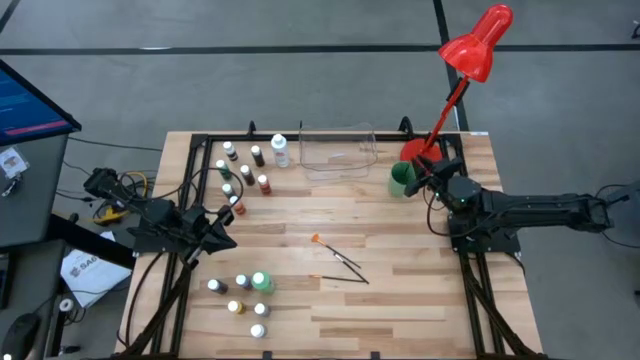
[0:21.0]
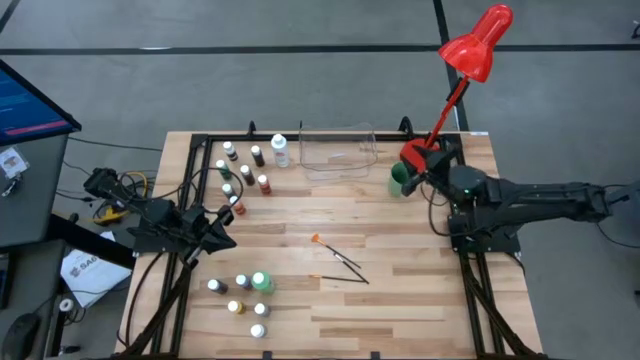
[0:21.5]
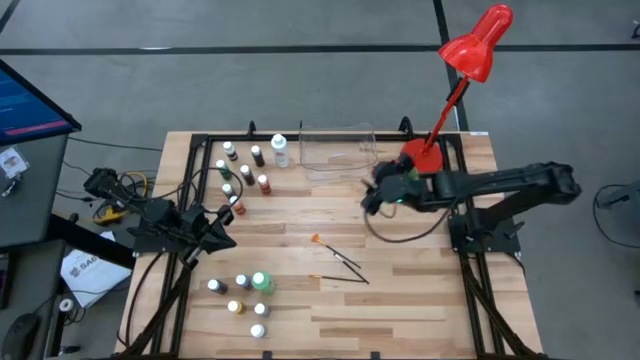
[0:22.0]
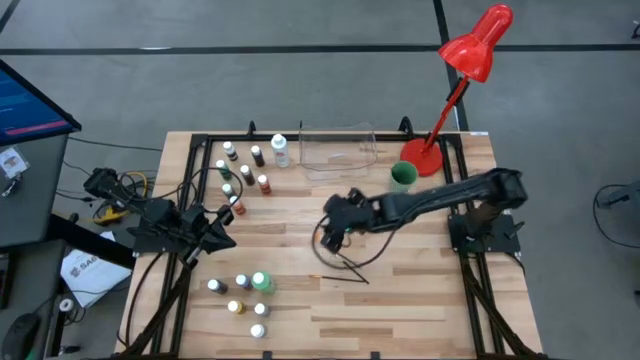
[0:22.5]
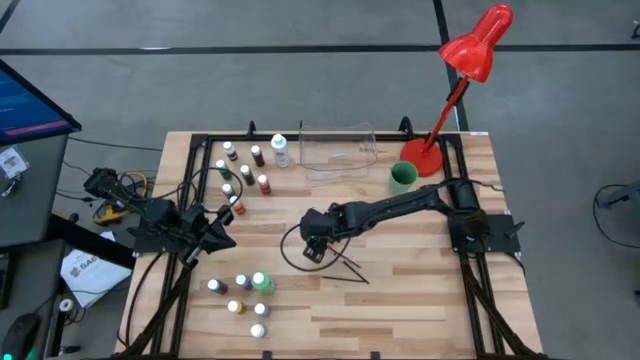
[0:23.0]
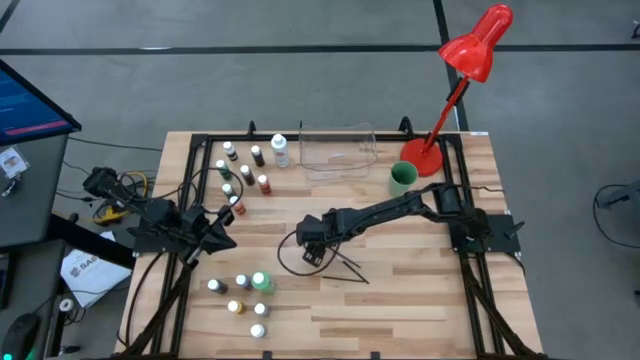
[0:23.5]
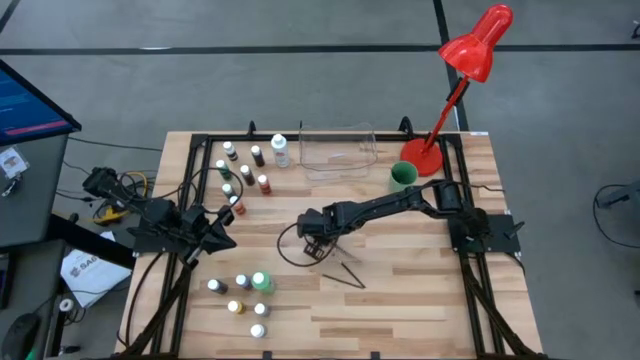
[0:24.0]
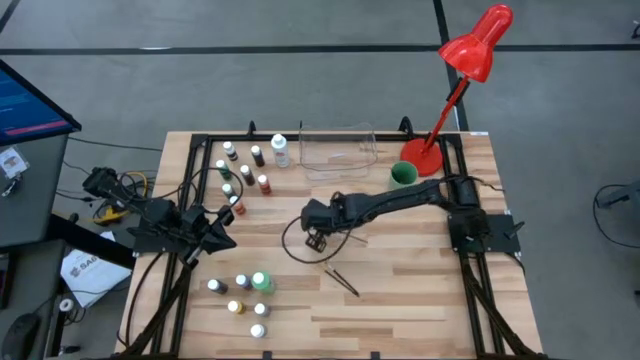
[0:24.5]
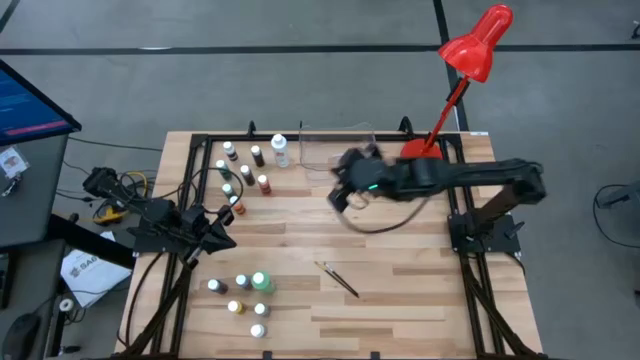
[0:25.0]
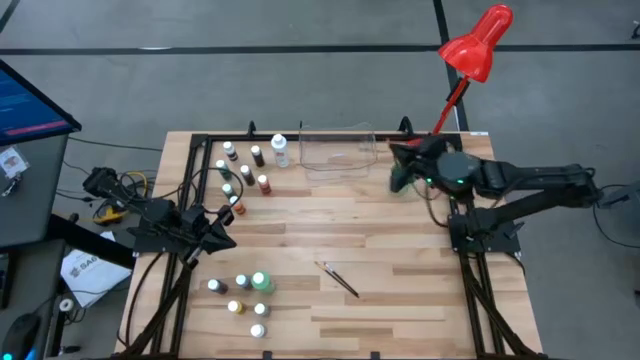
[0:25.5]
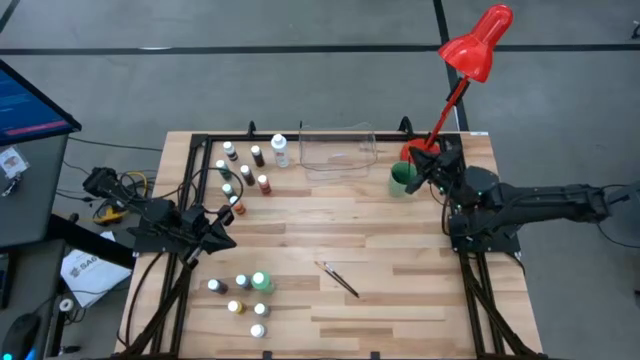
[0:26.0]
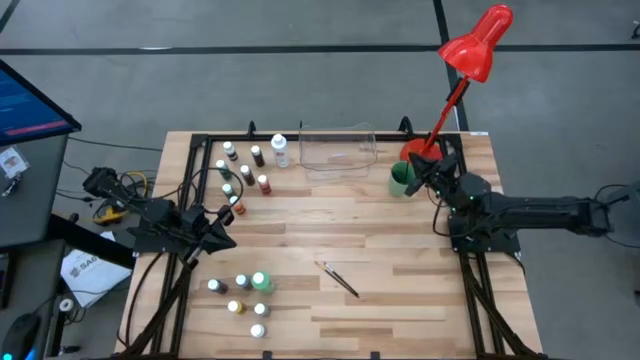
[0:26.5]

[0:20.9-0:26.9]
Task: Pick & Place Paint Supplies
Put the top gold paint brush into the green cup

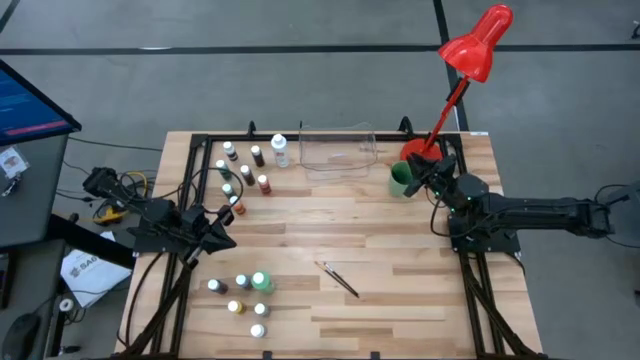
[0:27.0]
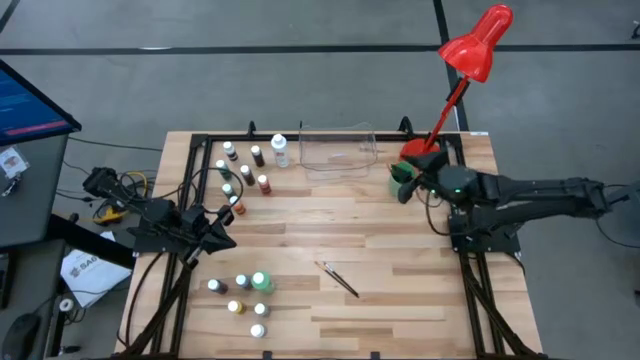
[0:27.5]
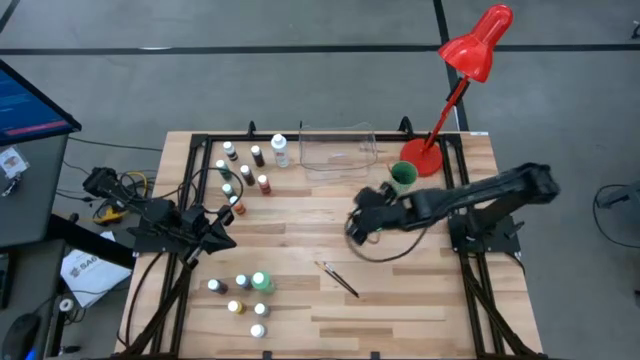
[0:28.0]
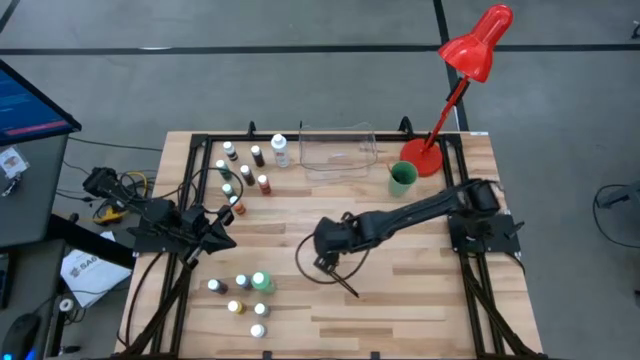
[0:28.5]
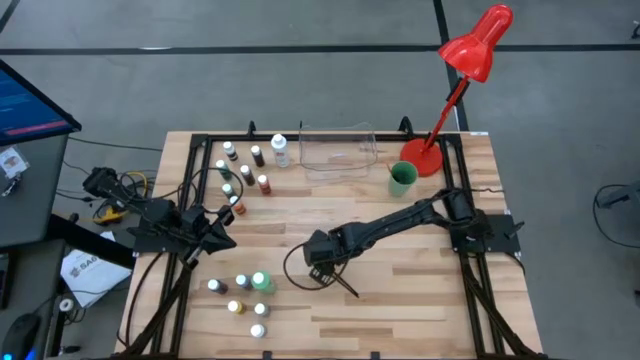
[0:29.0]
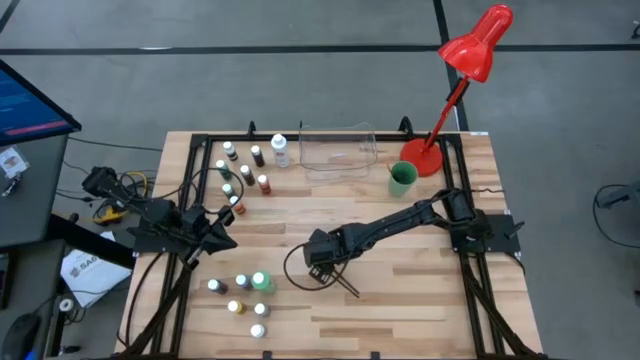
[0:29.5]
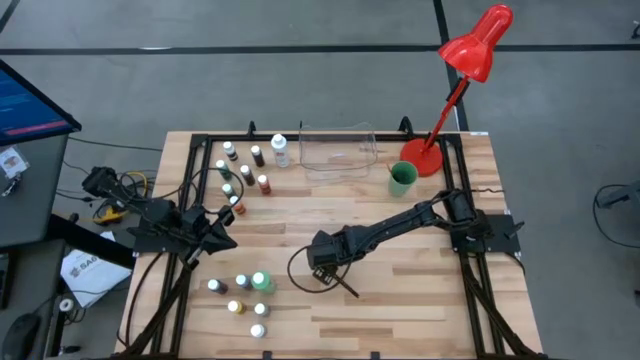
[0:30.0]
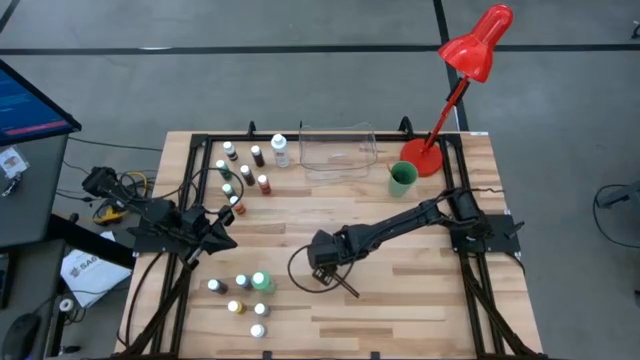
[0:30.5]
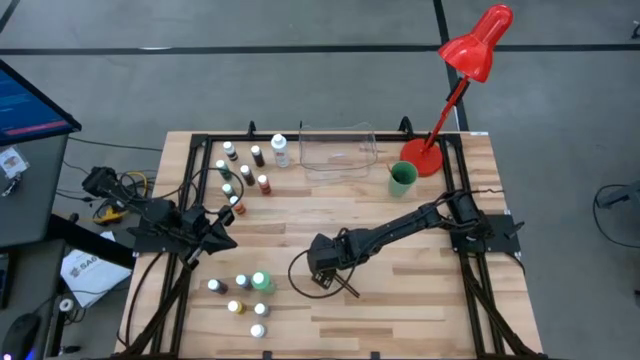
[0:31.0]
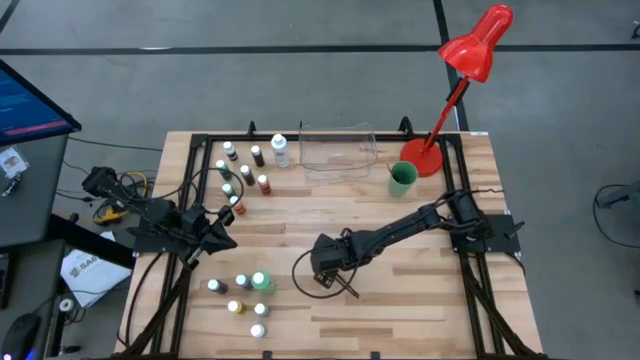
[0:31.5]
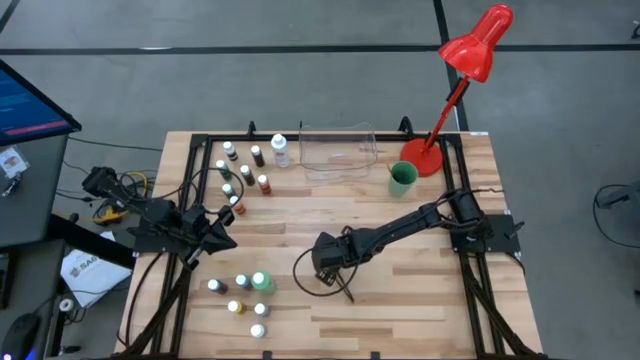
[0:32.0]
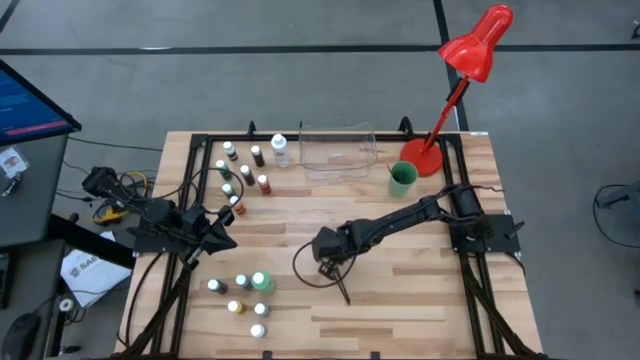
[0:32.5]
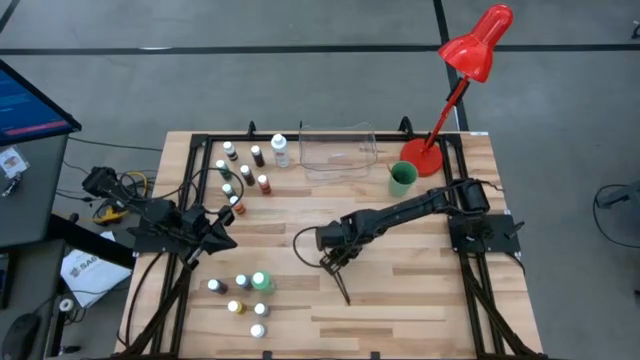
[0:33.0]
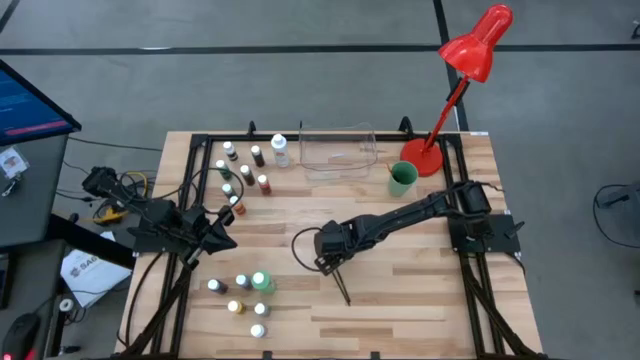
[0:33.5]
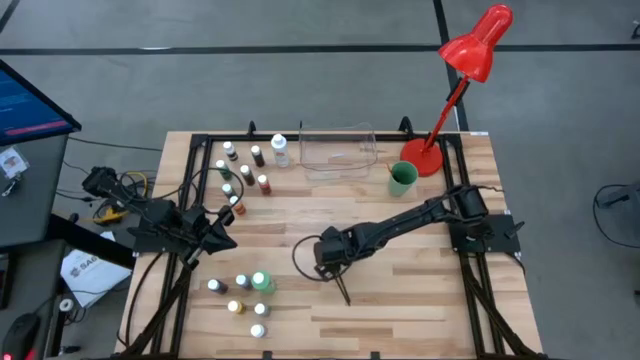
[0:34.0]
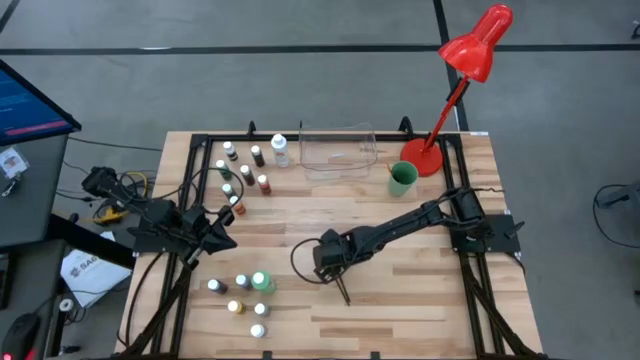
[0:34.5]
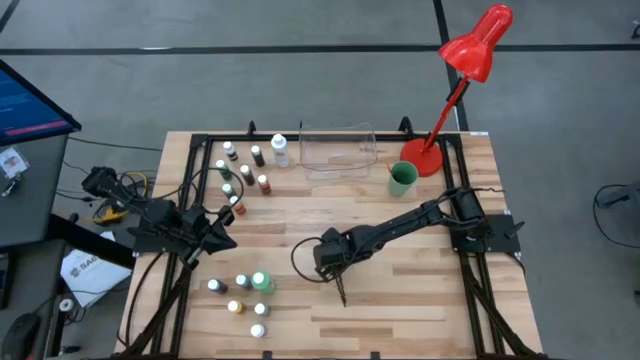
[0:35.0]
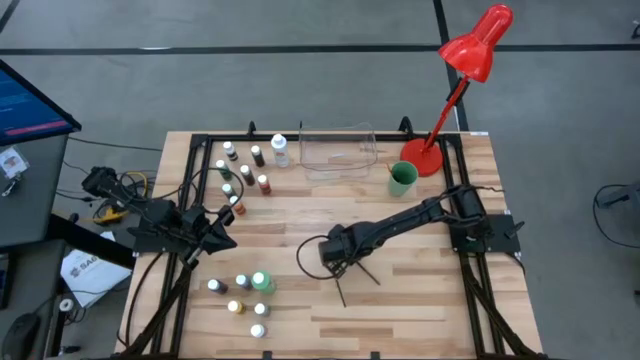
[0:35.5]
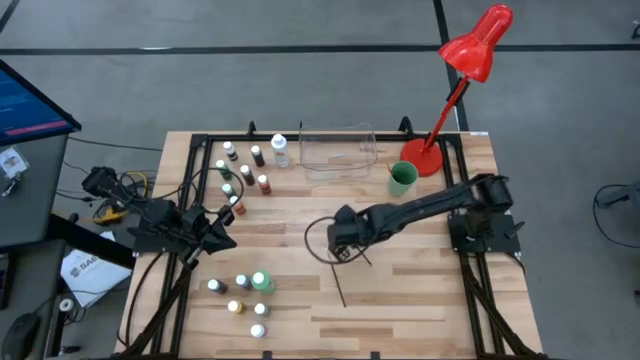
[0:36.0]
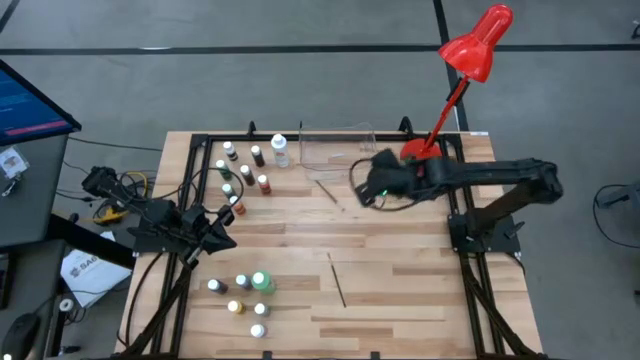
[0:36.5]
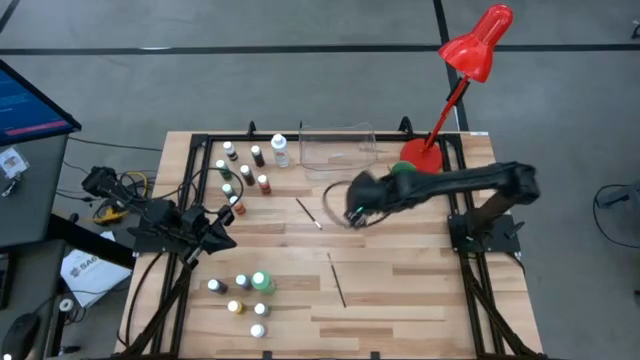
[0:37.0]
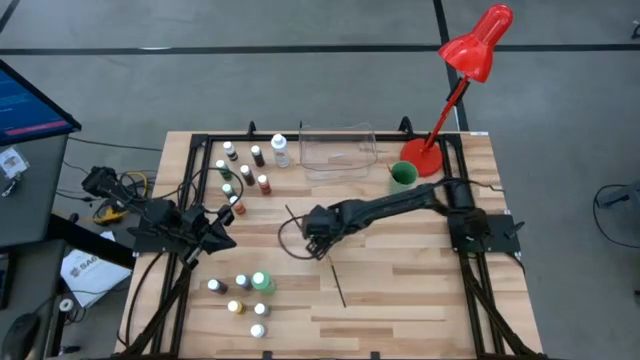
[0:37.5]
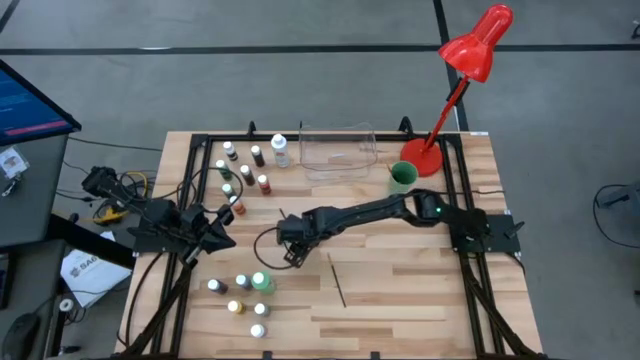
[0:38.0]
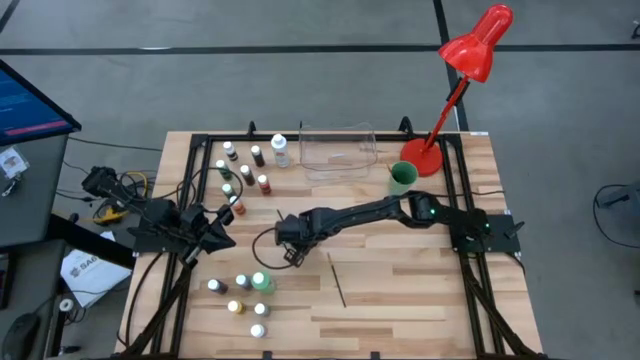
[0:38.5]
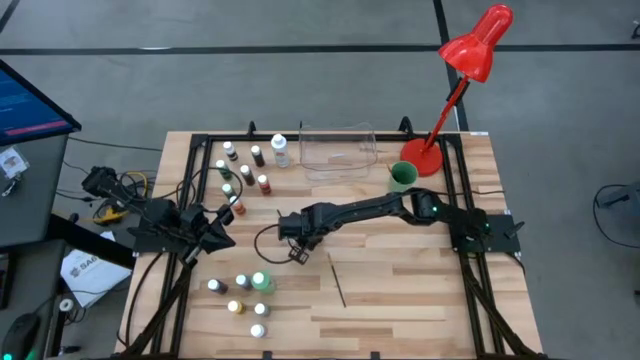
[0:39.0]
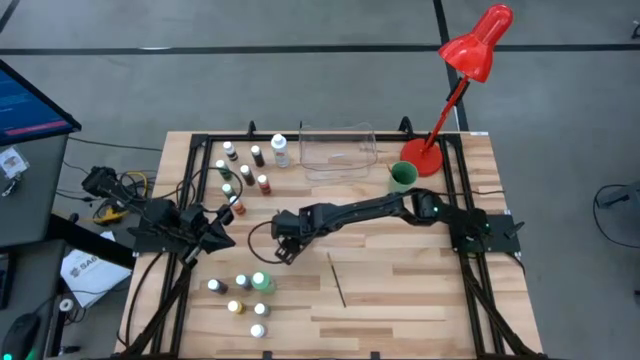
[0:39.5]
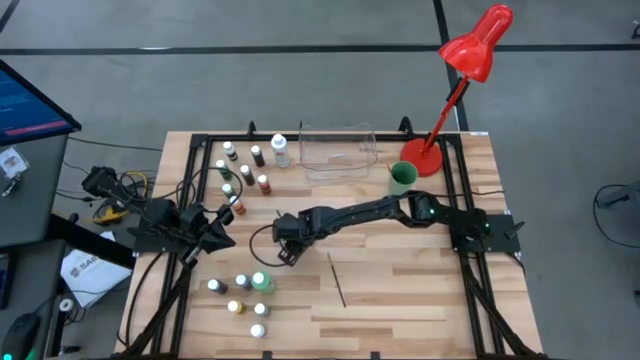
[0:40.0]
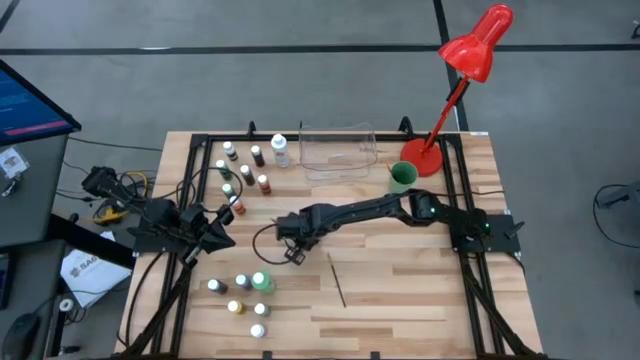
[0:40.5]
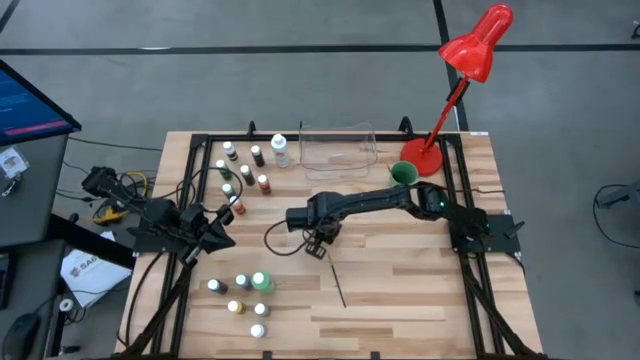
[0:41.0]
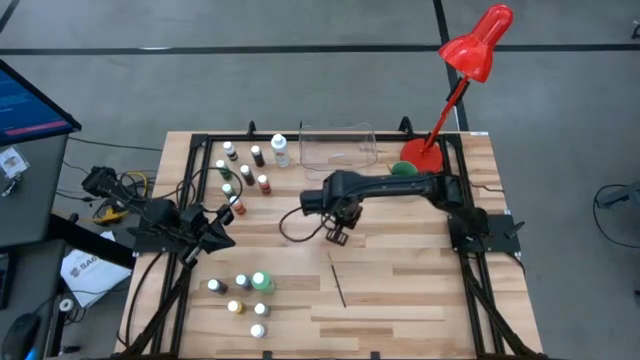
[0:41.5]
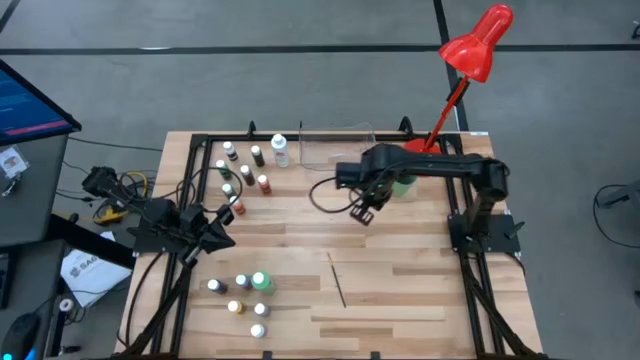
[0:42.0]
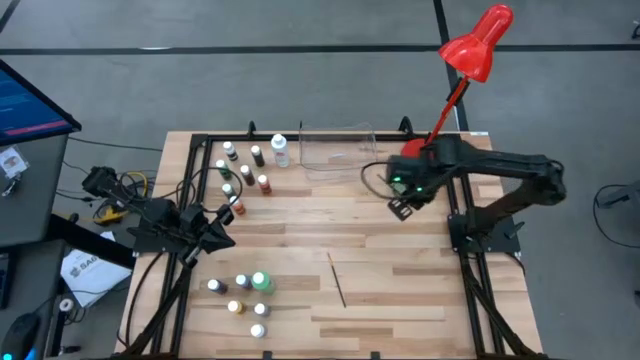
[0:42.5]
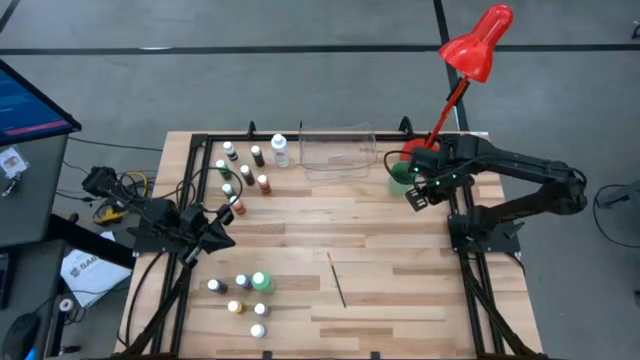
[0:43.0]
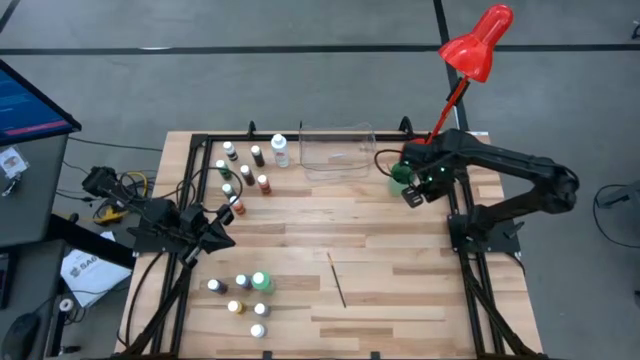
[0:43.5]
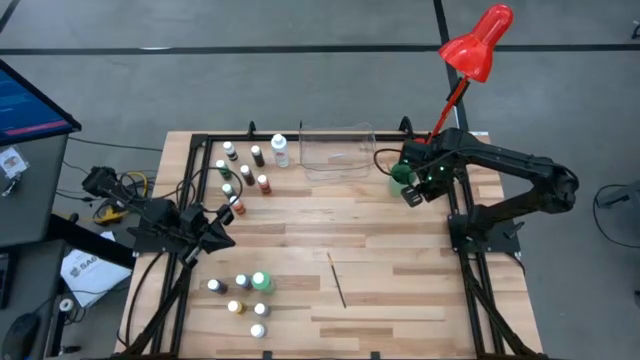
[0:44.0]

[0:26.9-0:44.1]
Put the silver paint brush into the green cup
